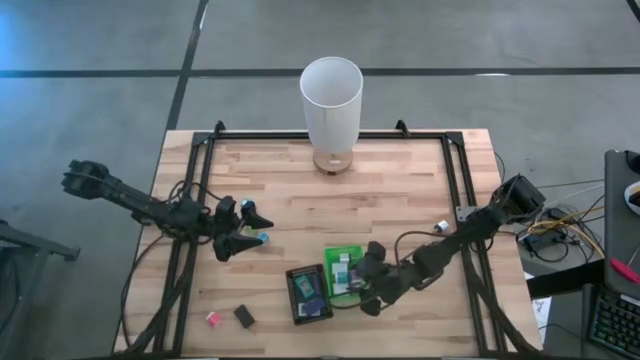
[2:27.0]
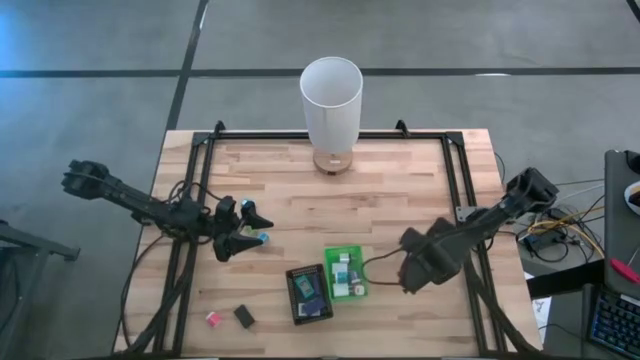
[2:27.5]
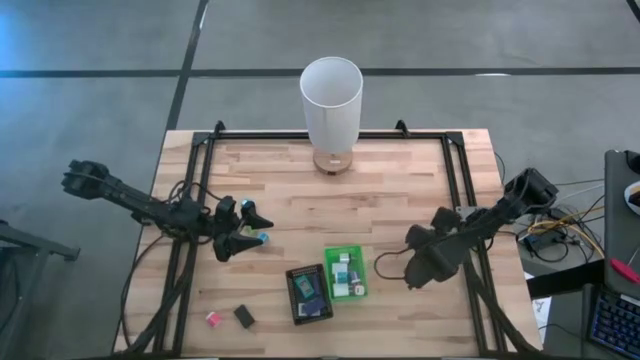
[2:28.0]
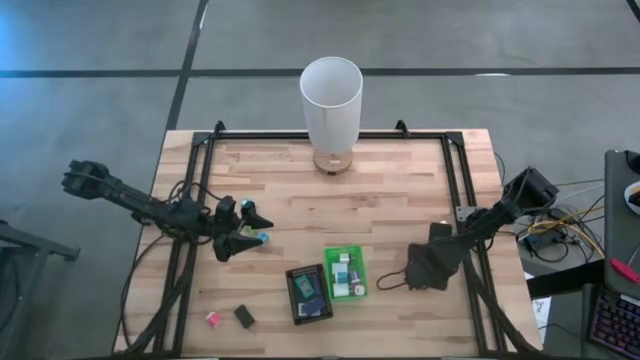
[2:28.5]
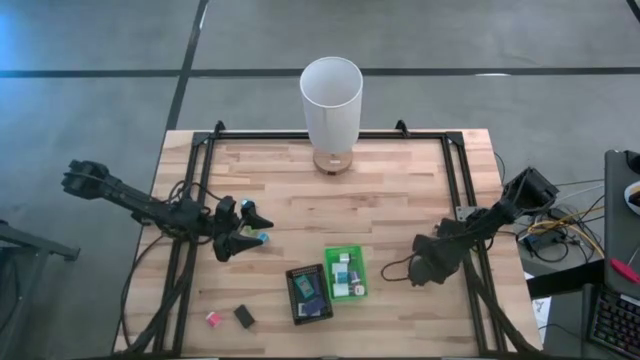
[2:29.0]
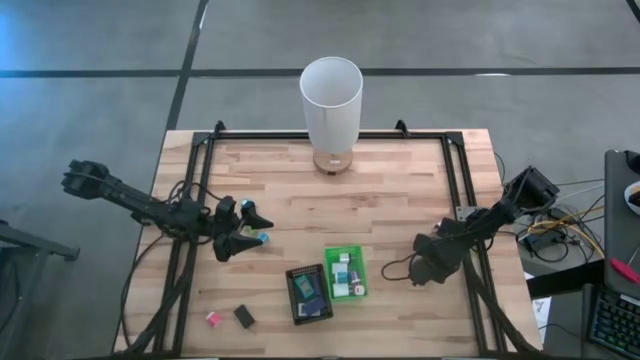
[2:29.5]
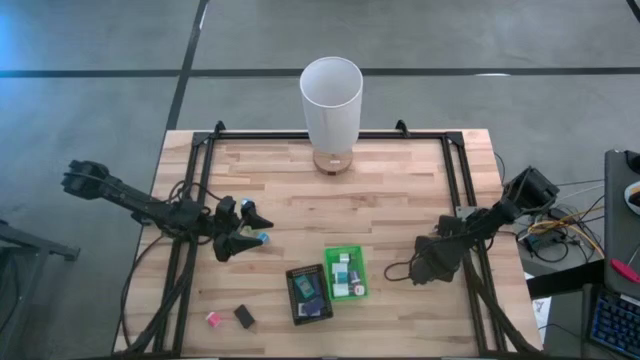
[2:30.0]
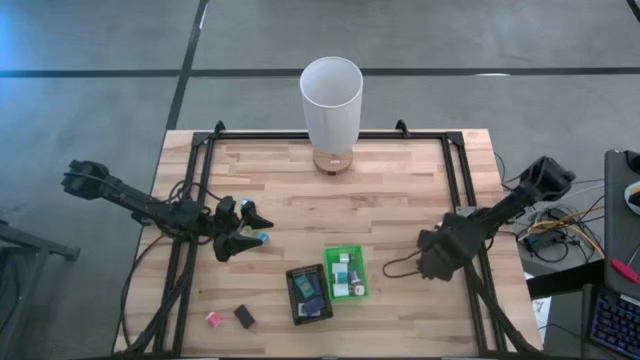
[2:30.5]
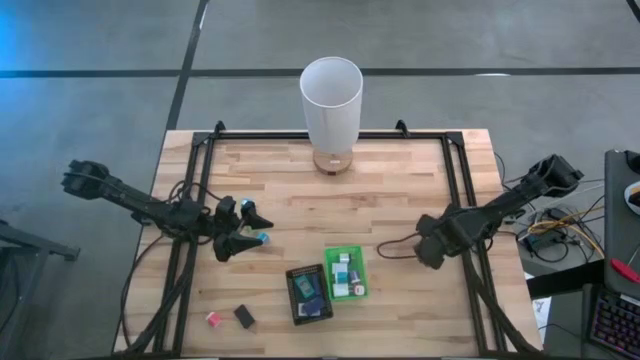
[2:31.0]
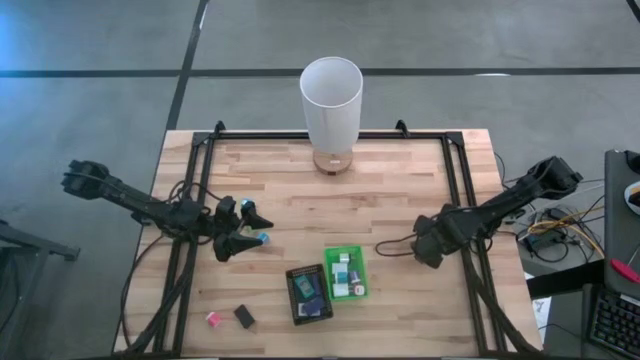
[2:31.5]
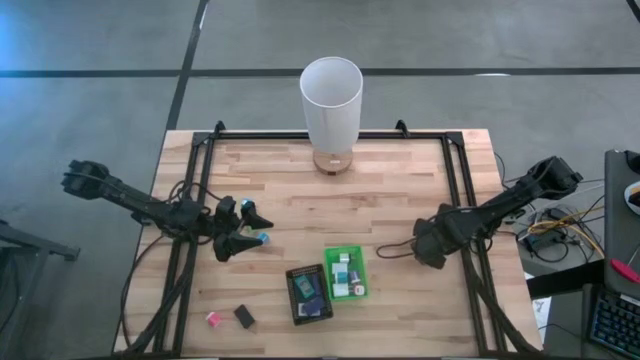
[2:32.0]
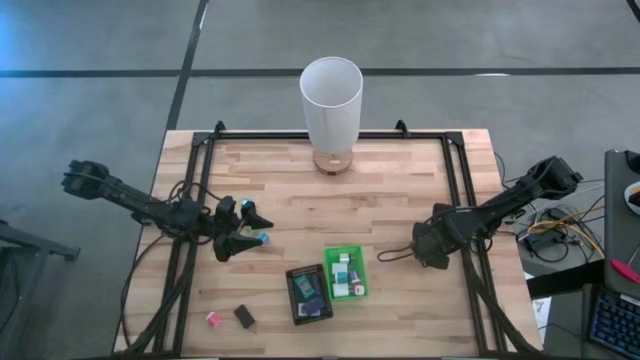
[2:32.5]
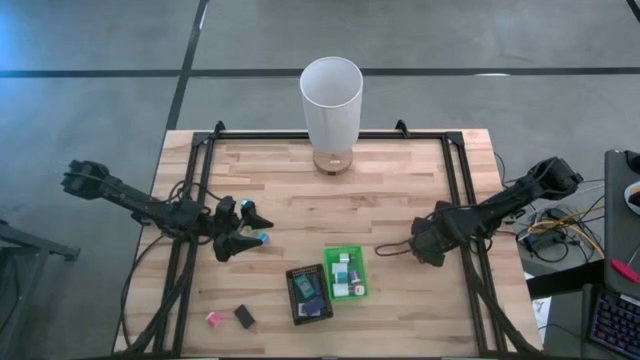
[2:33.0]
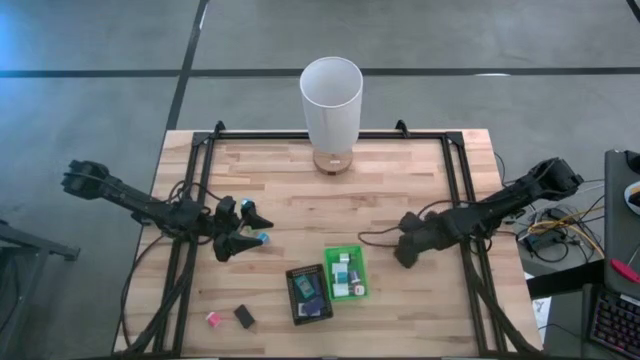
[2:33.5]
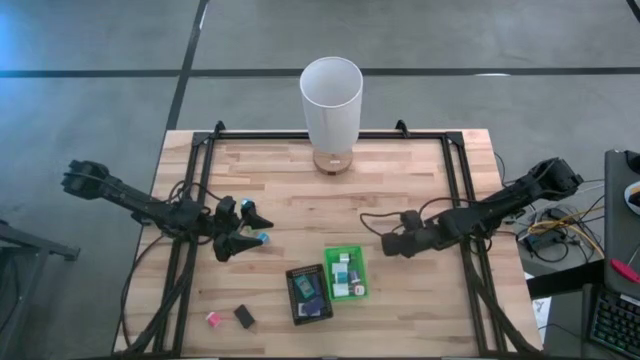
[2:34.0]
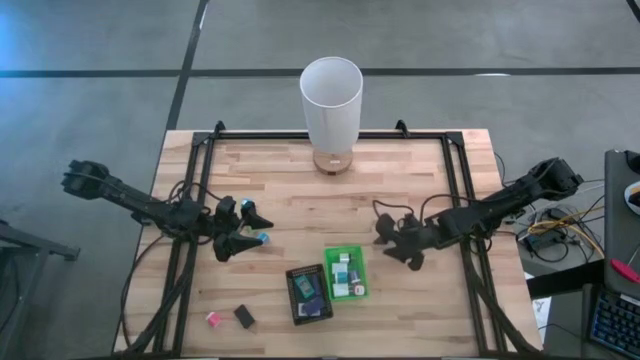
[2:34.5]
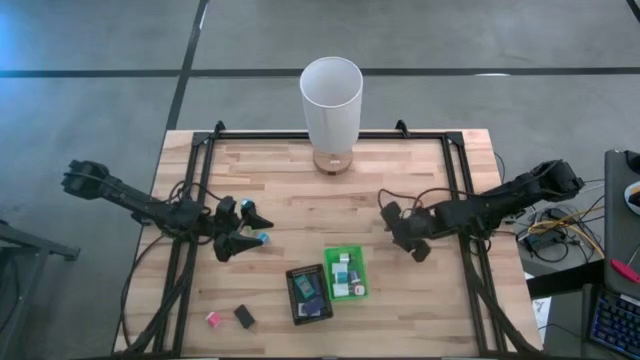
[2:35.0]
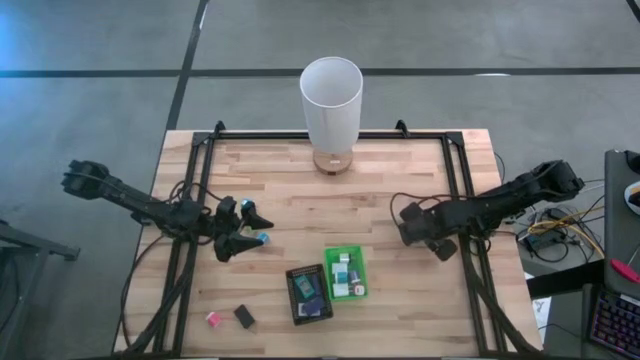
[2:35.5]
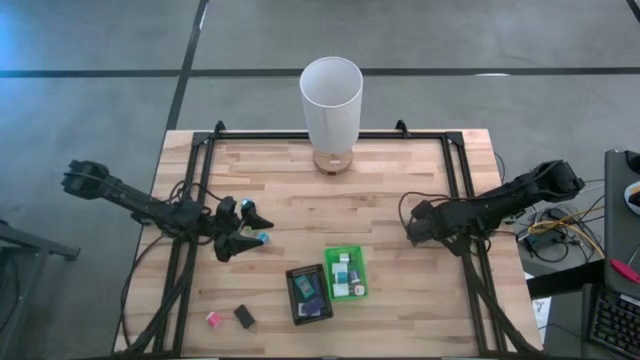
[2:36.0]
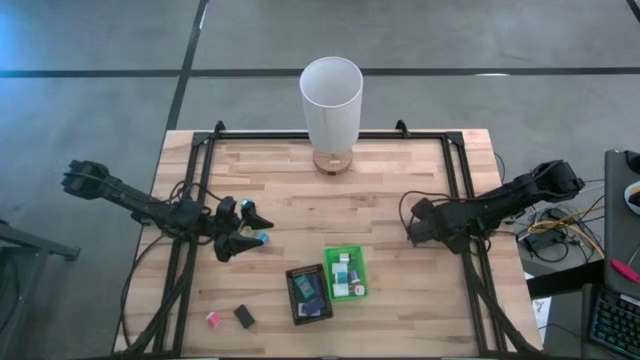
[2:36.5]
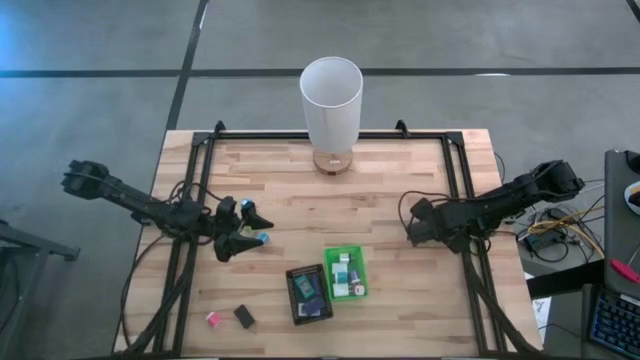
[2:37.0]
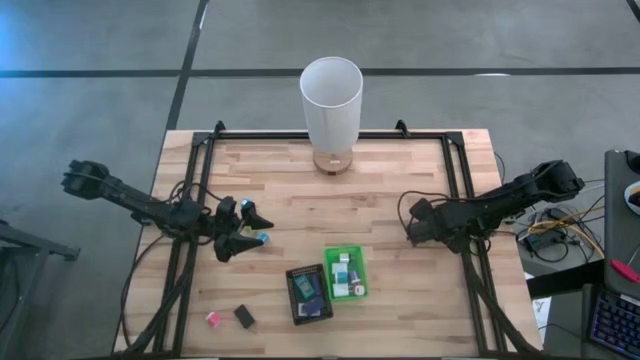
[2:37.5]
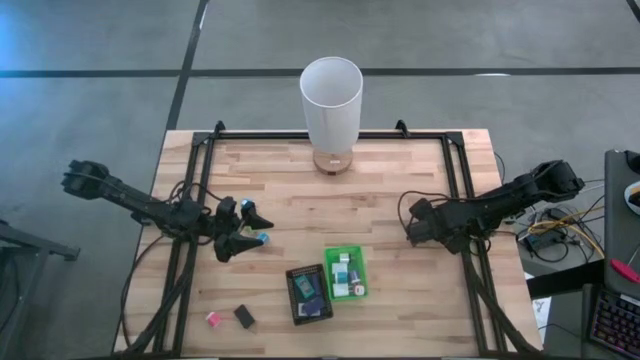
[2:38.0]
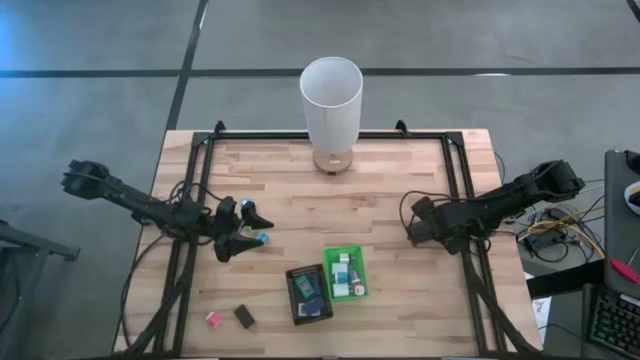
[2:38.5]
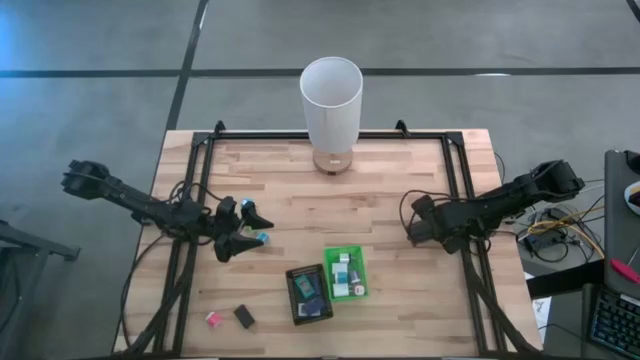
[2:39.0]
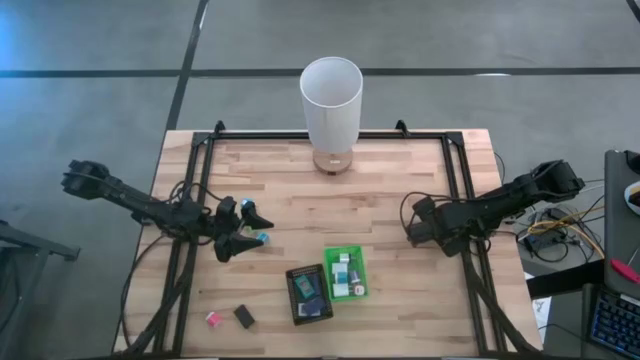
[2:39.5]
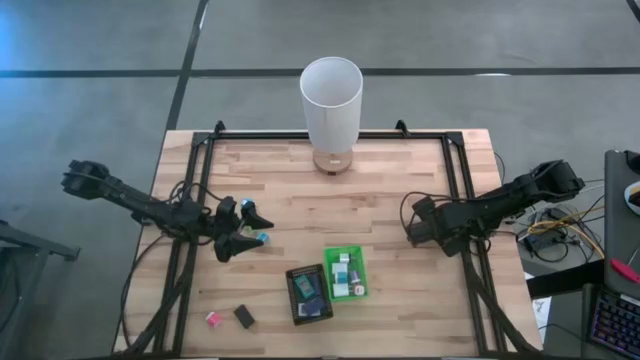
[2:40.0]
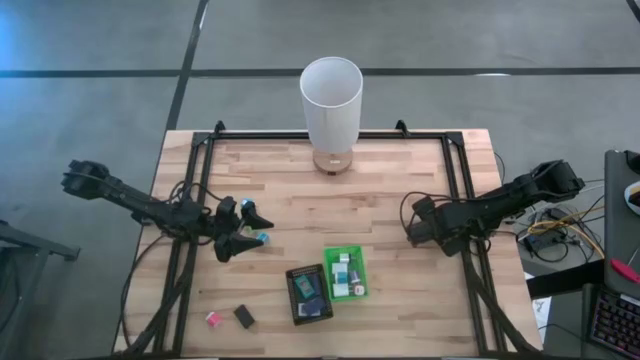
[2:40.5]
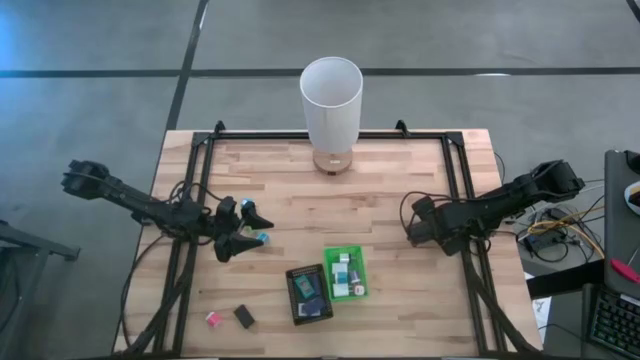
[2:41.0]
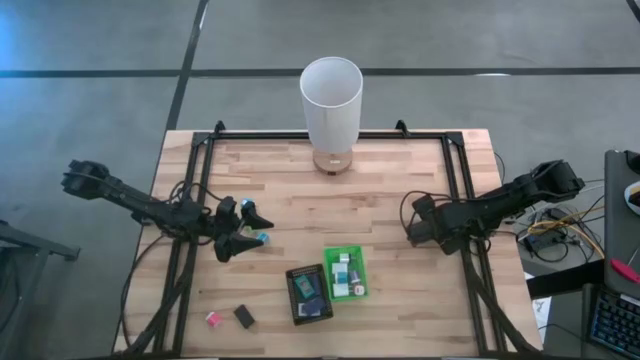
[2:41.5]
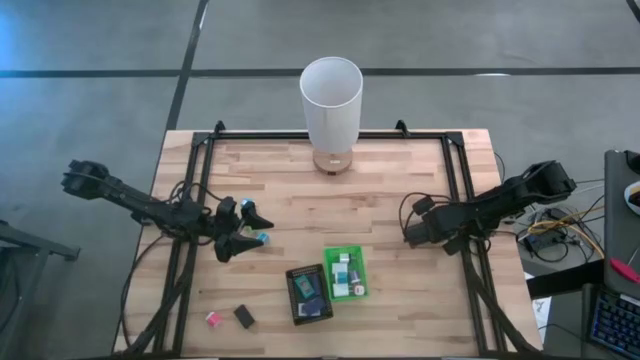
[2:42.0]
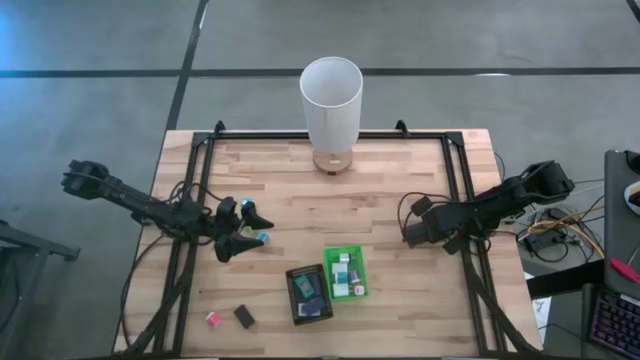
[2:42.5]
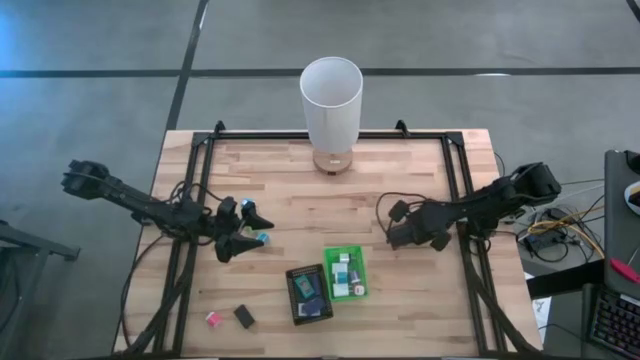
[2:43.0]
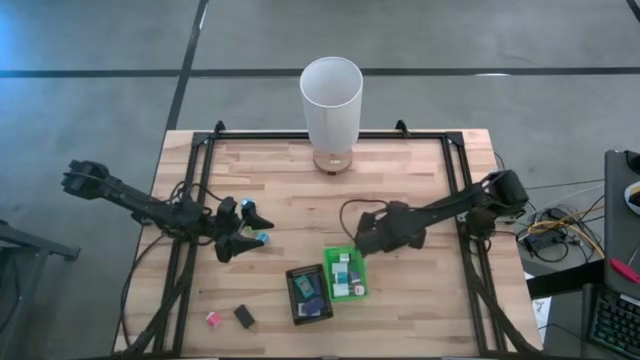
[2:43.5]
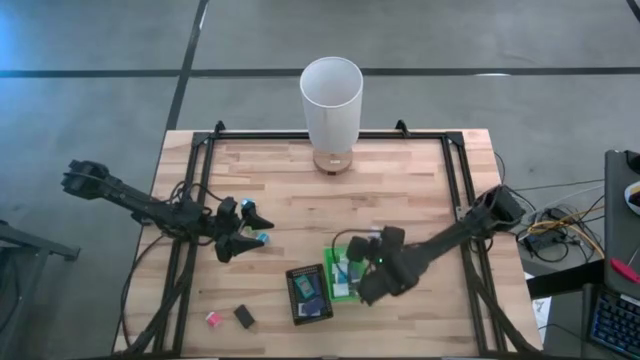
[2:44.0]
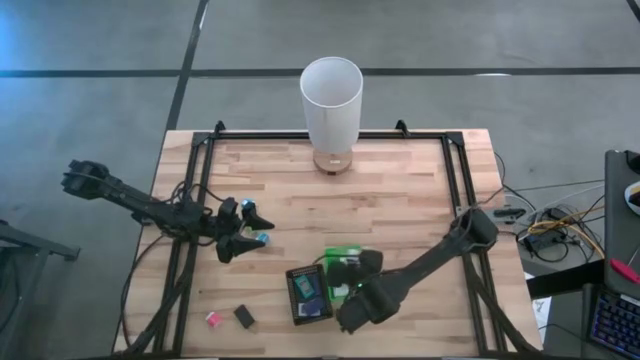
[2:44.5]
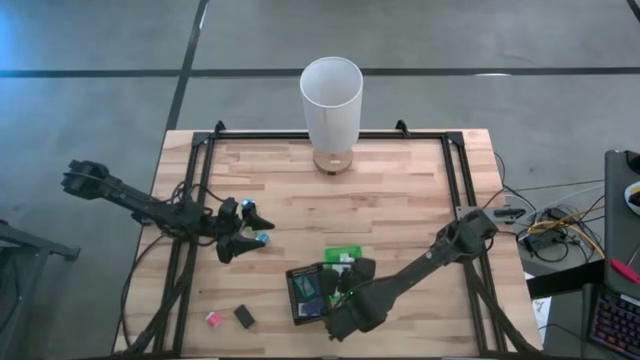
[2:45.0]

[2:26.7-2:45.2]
Task: Pick & Place Office items
Put the white black charger adapter into the green bin
